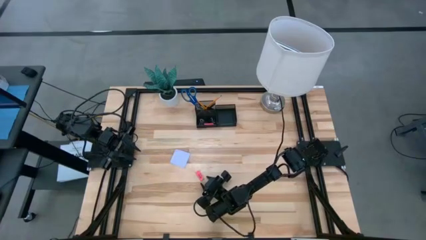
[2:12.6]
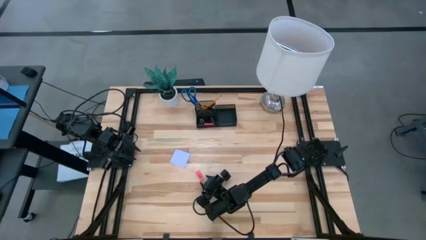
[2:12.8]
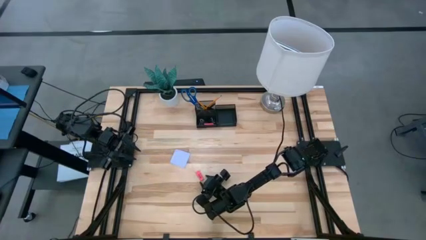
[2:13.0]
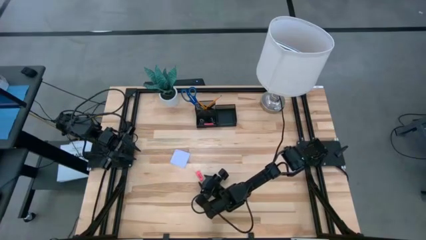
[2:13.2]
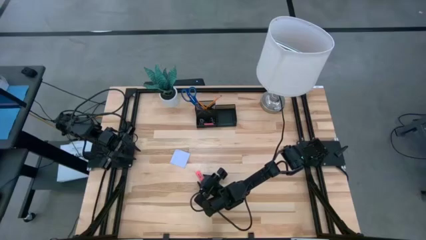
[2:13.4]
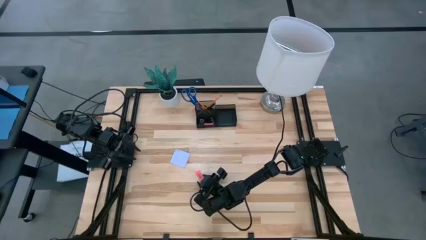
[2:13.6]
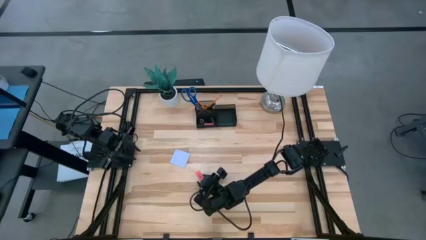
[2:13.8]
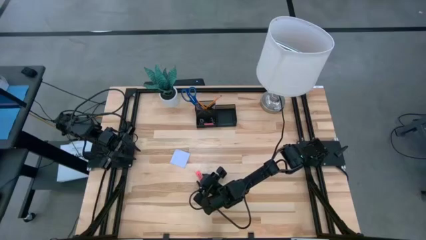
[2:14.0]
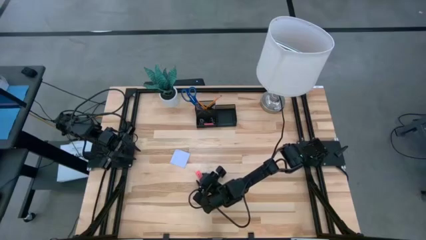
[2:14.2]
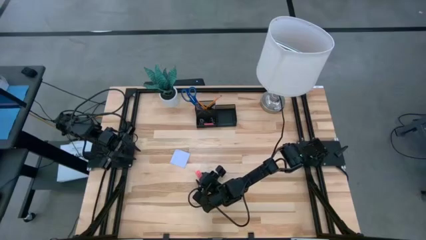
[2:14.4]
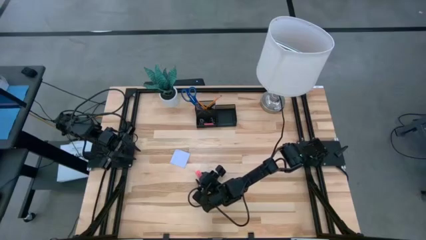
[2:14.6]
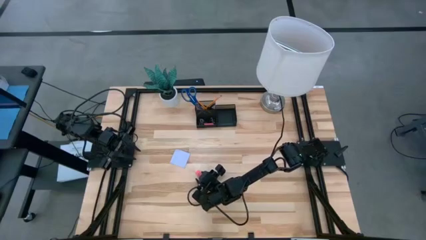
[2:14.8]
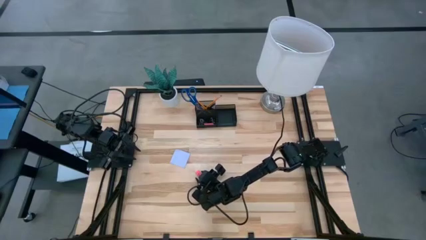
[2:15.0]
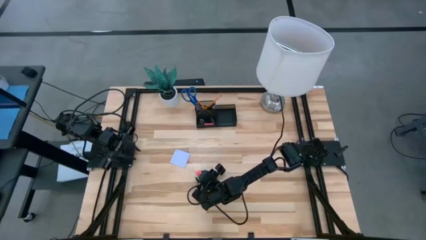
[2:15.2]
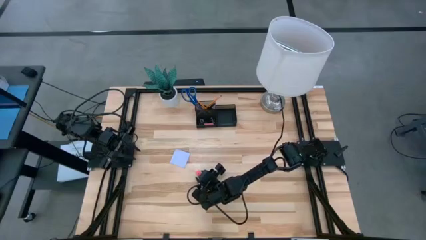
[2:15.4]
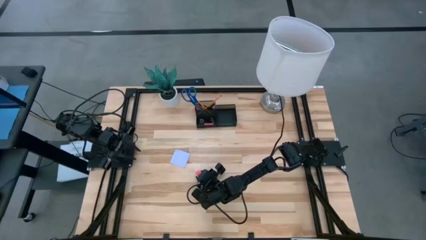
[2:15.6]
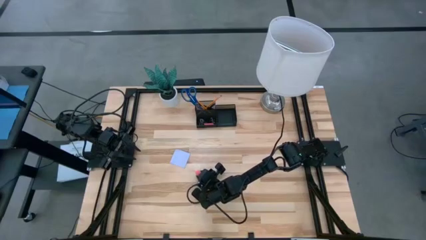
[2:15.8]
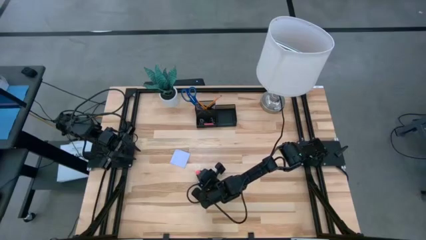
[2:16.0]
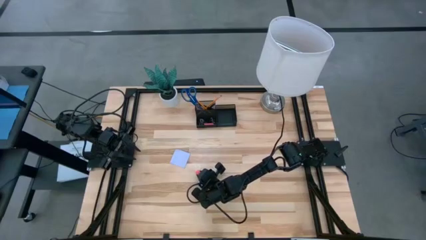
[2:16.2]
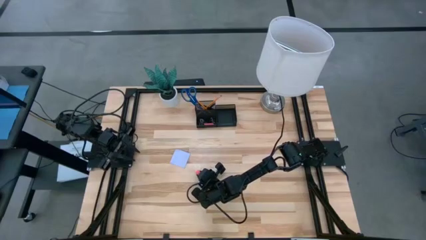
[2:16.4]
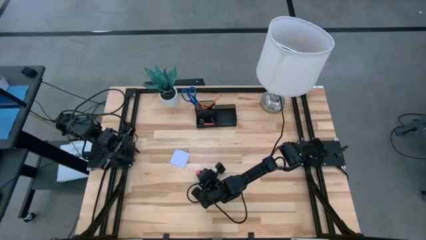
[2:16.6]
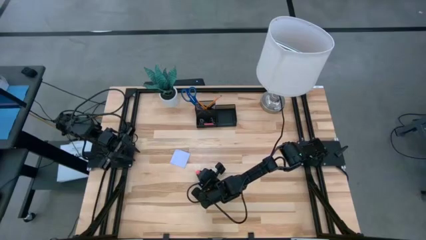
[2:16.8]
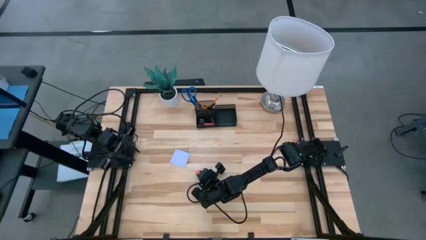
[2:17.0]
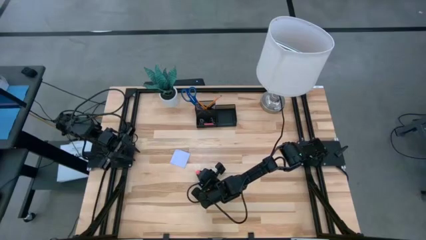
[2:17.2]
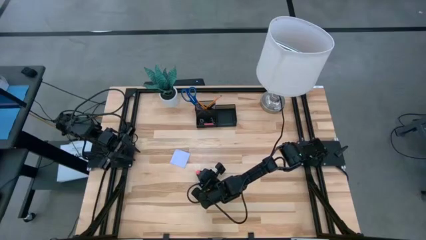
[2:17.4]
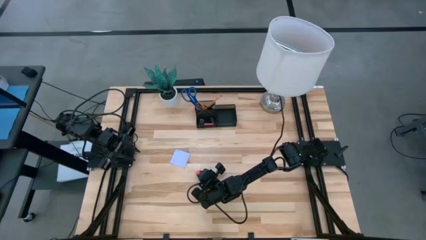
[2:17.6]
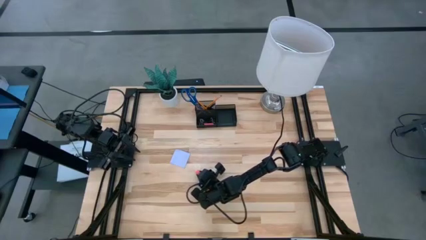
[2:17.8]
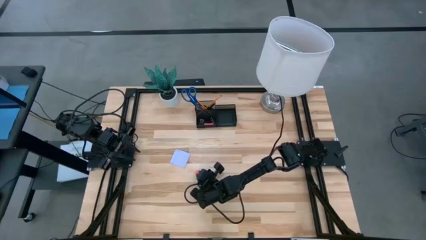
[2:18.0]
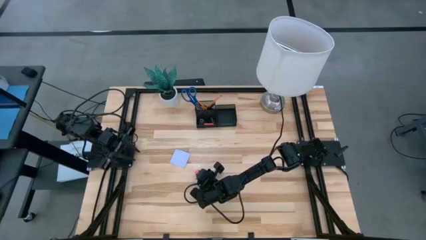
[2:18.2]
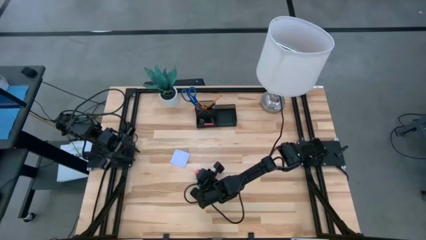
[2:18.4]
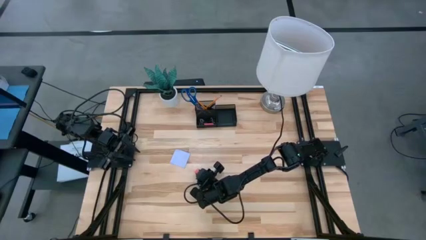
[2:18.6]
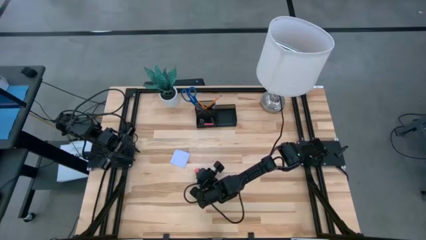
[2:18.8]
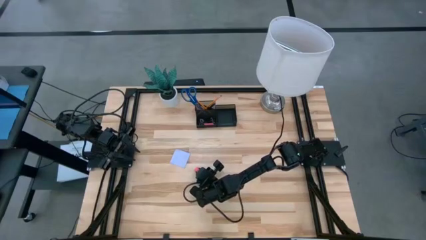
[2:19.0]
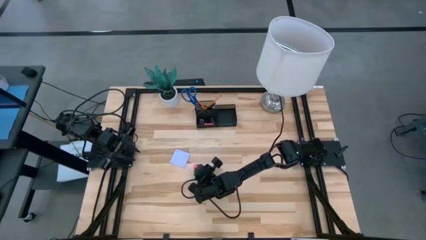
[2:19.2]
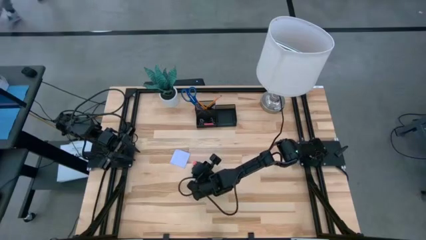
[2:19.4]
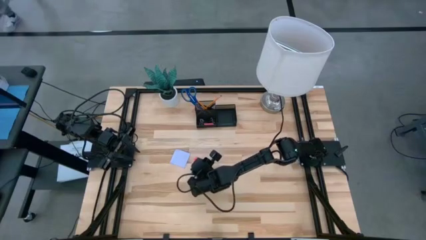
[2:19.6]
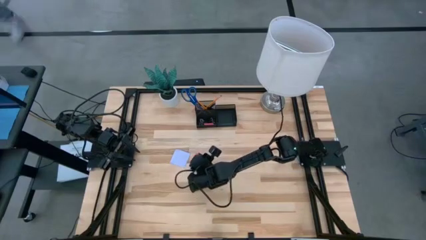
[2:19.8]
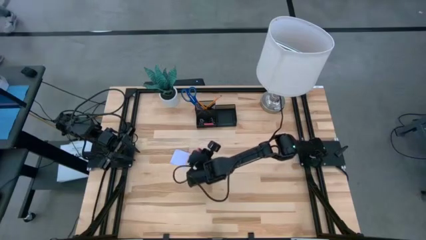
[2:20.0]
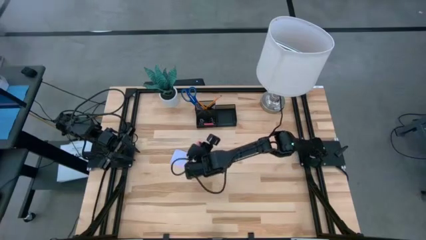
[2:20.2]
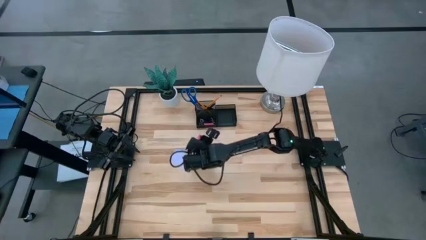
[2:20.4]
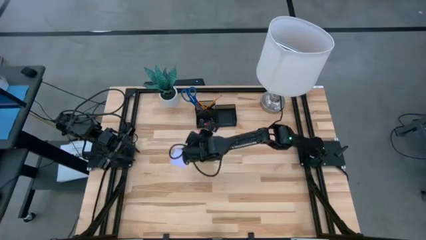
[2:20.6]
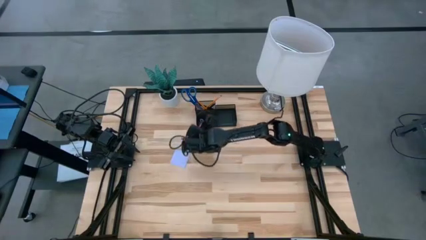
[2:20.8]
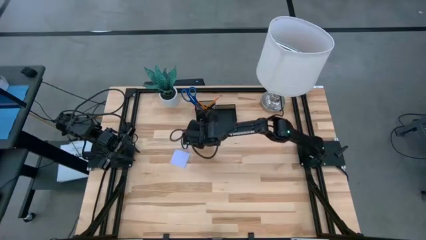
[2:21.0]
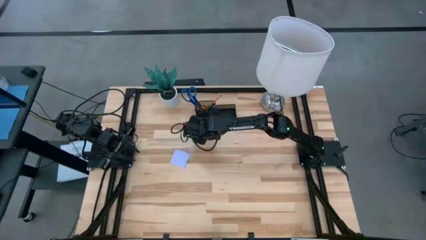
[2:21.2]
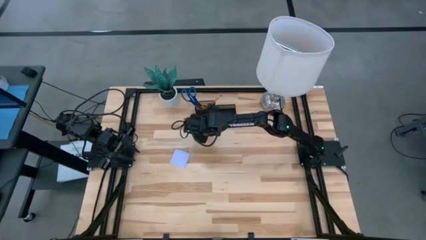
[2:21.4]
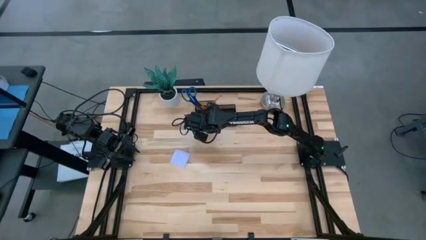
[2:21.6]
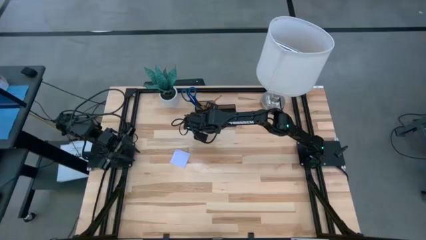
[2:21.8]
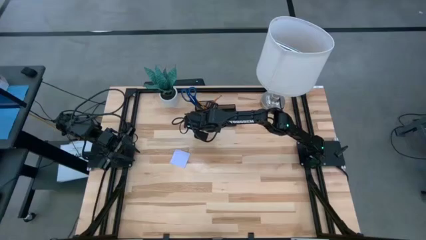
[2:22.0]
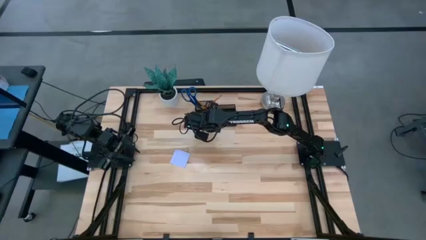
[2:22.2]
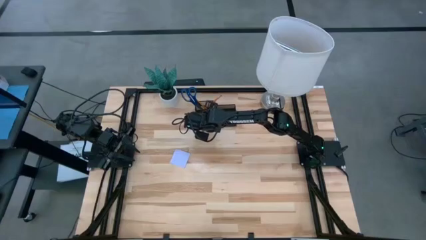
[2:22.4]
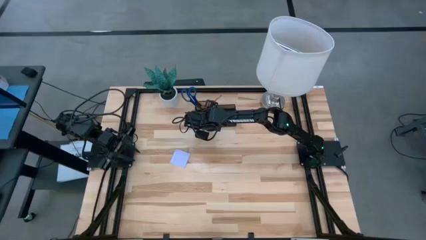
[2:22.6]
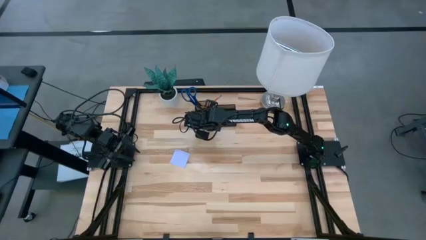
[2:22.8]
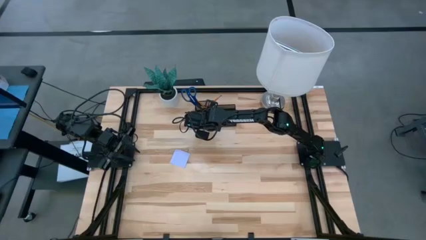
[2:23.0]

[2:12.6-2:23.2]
Task: Pick and place office supplies into organizer
Put the pink eraser into the desk organizer

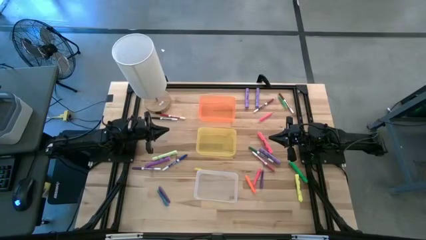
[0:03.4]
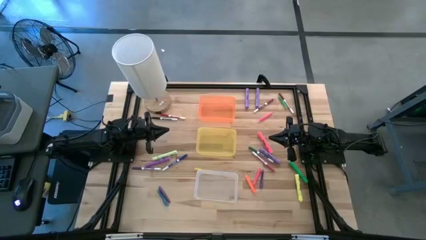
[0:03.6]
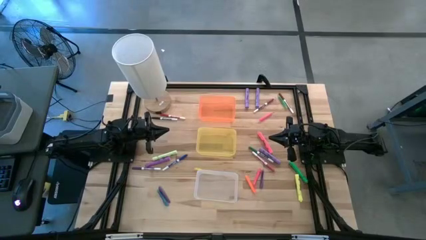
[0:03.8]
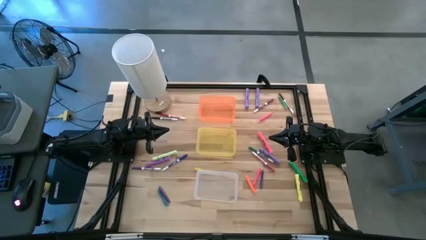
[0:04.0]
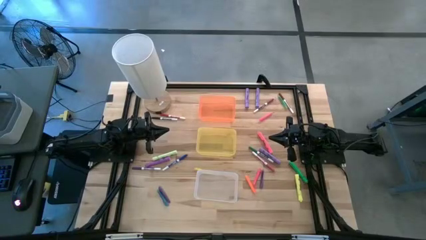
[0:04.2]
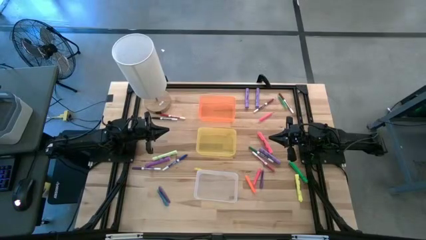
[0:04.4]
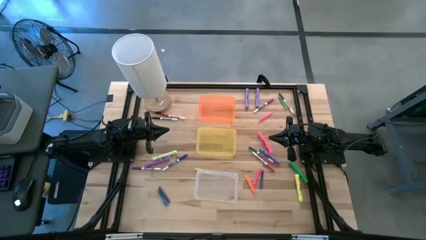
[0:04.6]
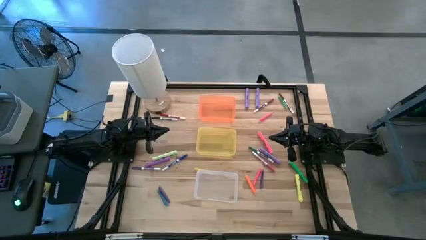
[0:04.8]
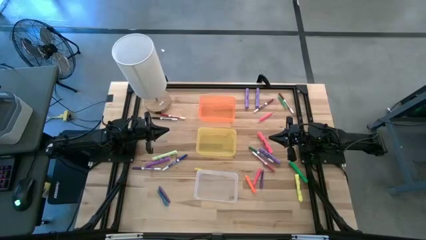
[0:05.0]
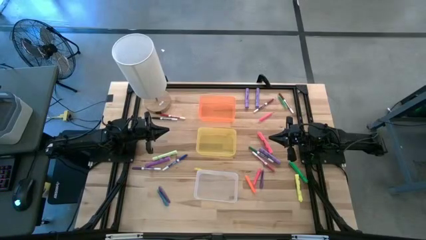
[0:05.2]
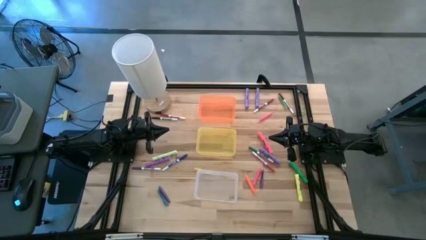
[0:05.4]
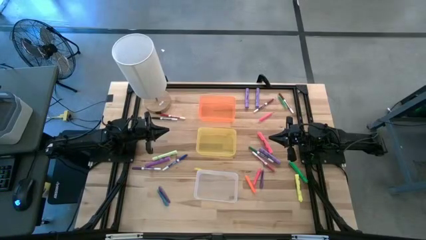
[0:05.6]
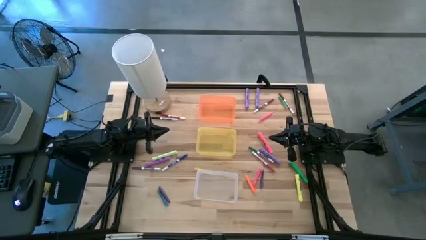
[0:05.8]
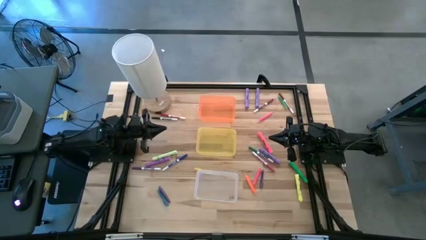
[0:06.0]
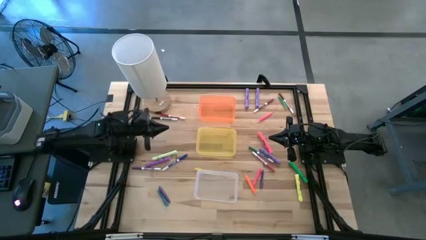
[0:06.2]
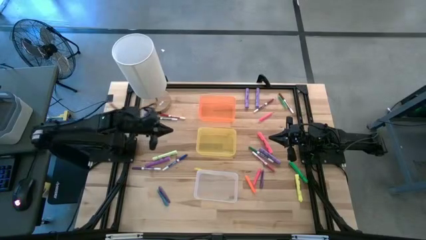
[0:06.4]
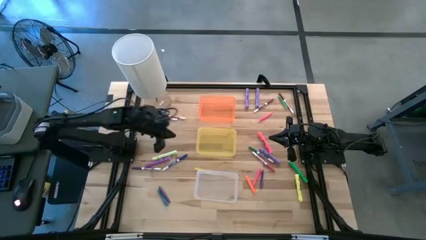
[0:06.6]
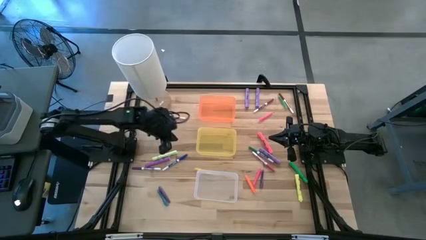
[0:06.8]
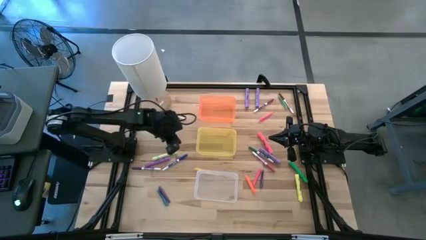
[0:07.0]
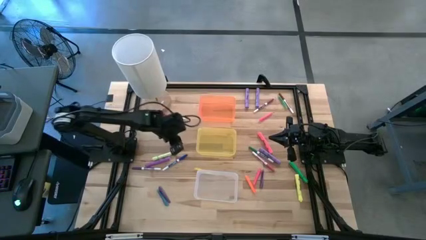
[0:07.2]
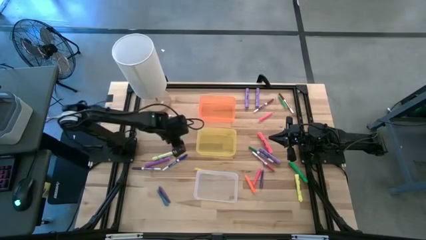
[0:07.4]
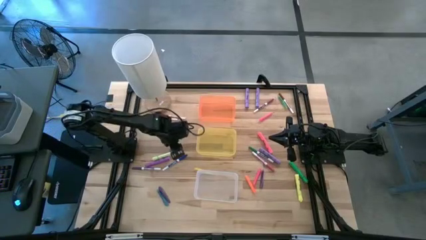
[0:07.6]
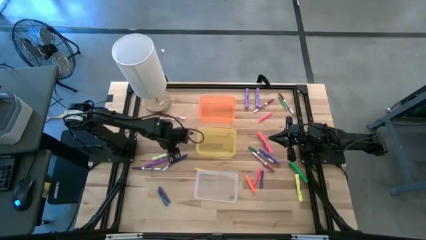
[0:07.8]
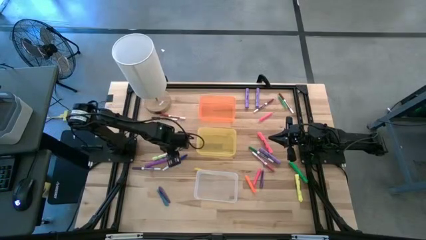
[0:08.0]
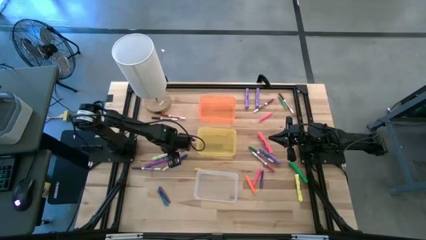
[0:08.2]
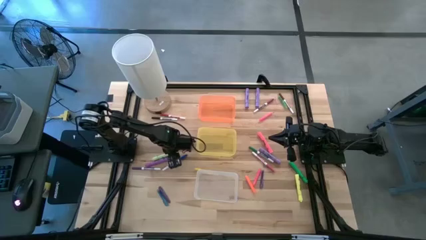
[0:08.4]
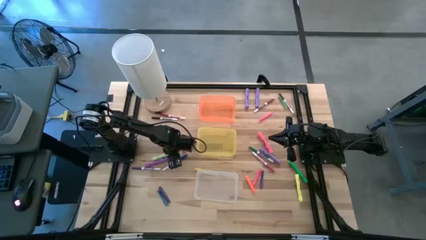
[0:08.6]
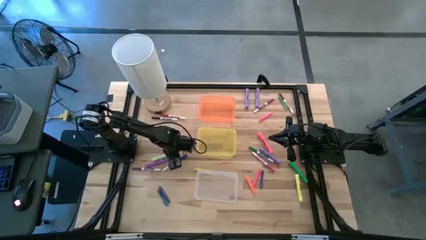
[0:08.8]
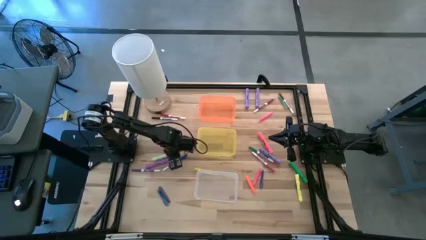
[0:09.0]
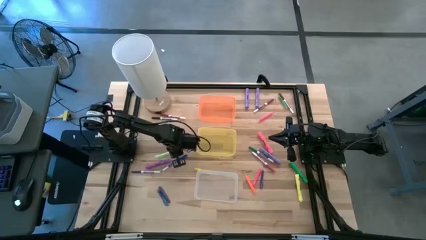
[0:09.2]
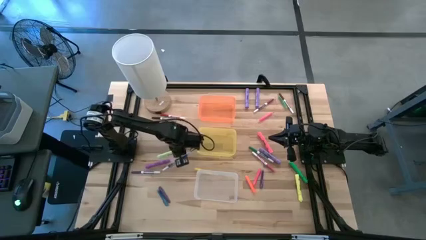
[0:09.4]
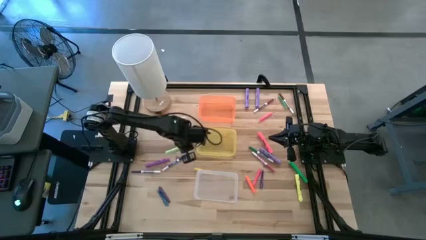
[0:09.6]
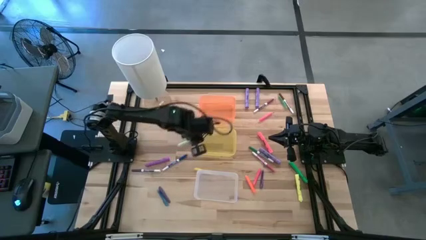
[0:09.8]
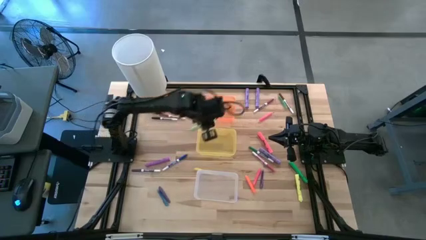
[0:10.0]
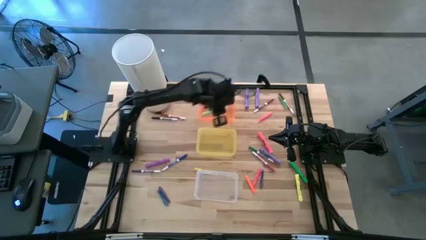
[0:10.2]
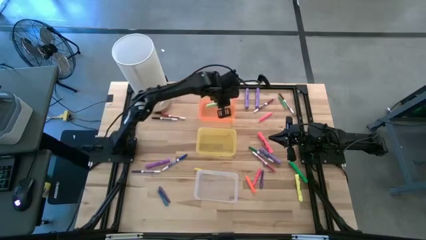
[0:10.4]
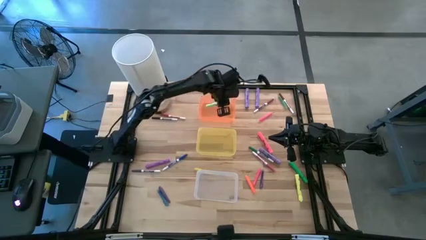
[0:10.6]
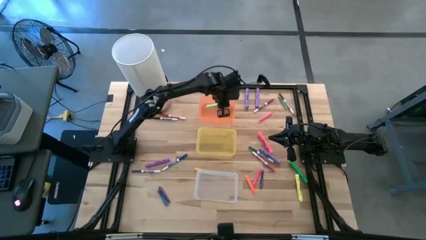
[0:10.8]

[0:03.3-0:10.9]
Task: Pick & Place Markers
Put the light green highlighter pen into the orange bin
